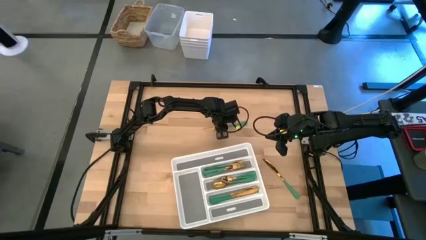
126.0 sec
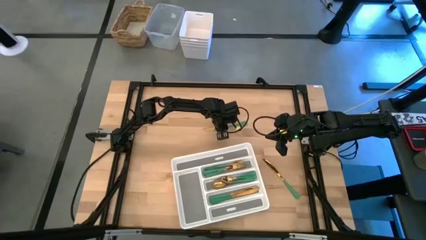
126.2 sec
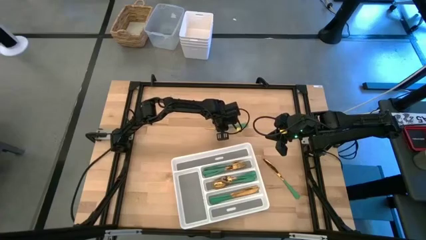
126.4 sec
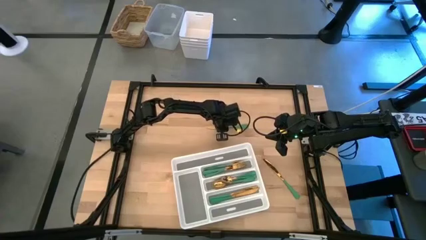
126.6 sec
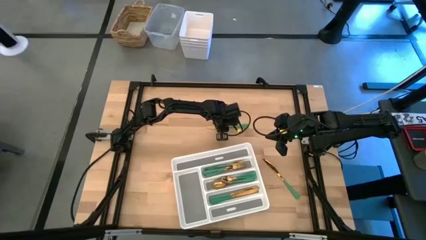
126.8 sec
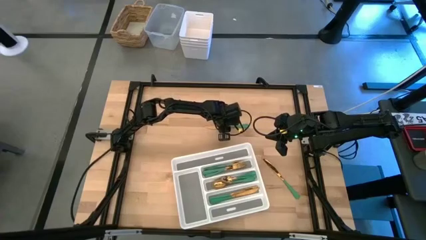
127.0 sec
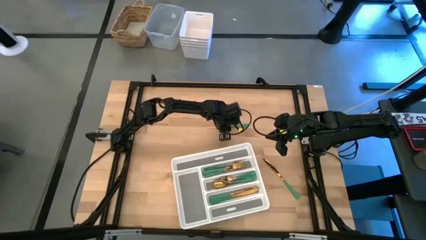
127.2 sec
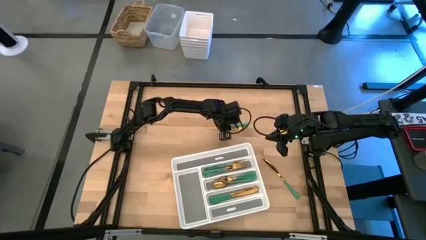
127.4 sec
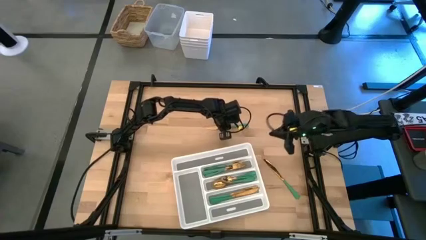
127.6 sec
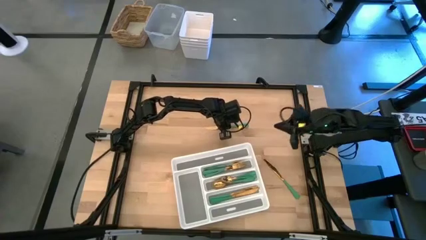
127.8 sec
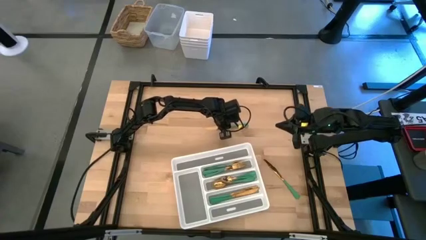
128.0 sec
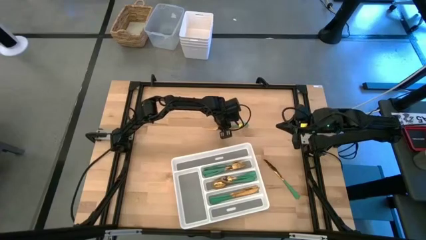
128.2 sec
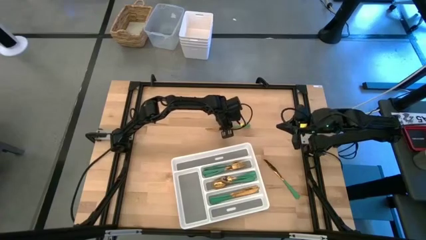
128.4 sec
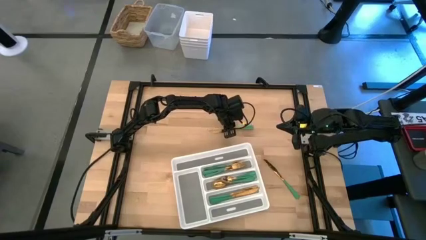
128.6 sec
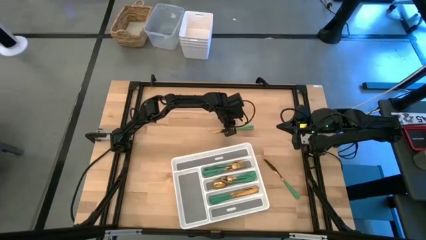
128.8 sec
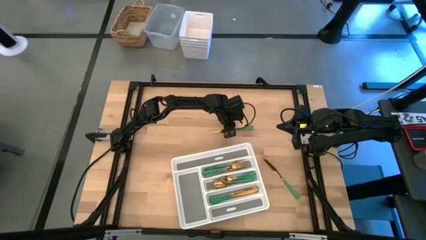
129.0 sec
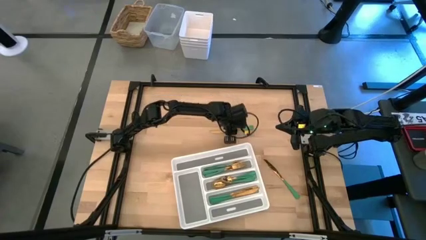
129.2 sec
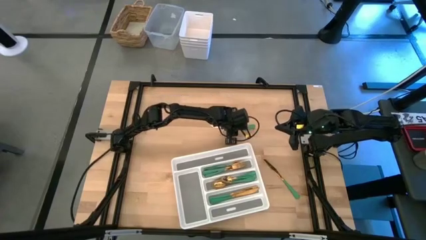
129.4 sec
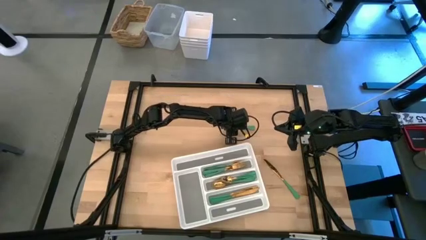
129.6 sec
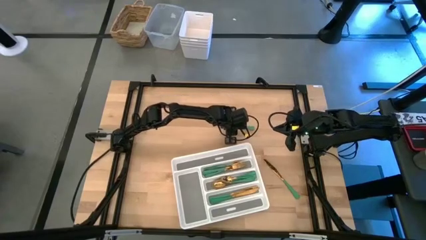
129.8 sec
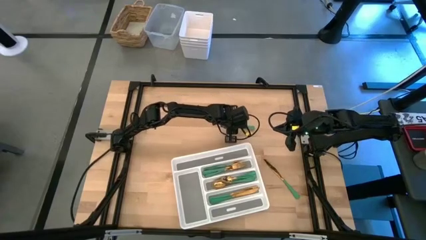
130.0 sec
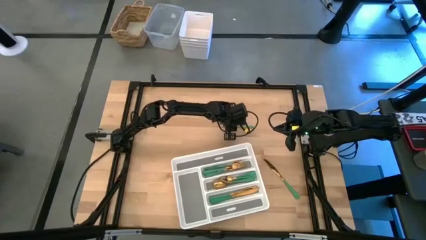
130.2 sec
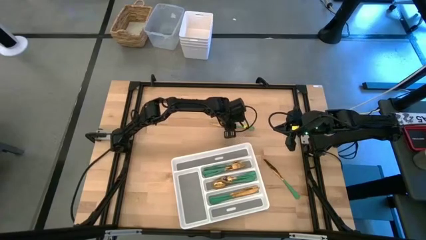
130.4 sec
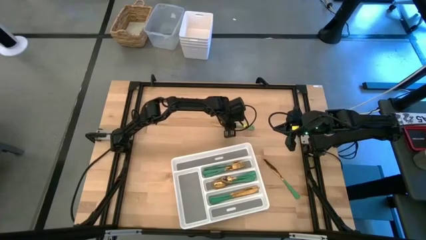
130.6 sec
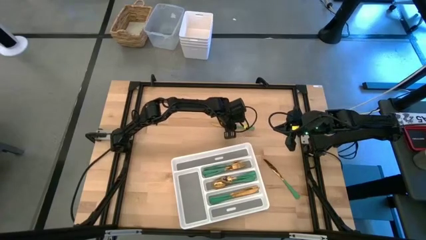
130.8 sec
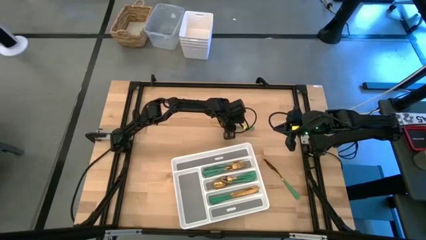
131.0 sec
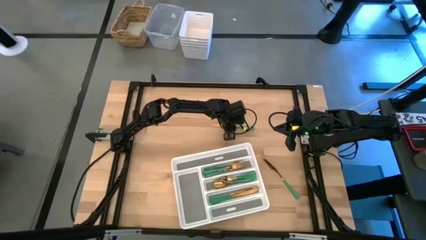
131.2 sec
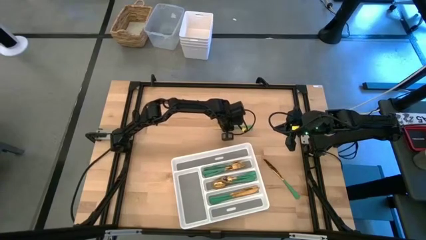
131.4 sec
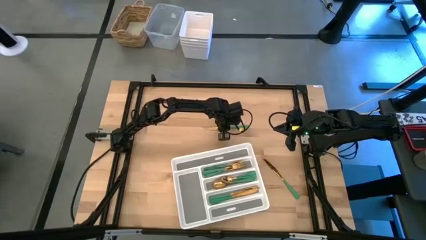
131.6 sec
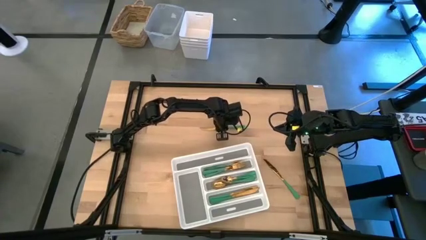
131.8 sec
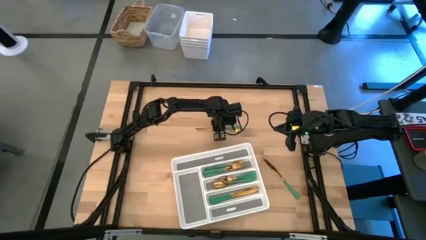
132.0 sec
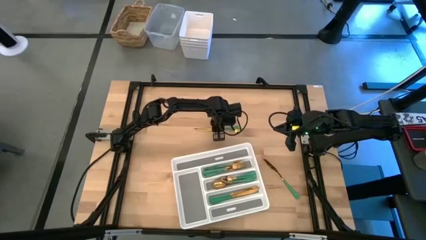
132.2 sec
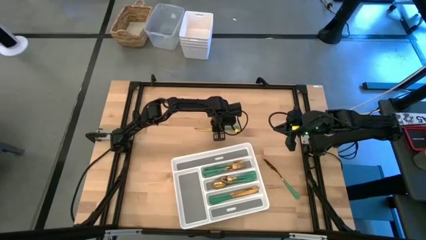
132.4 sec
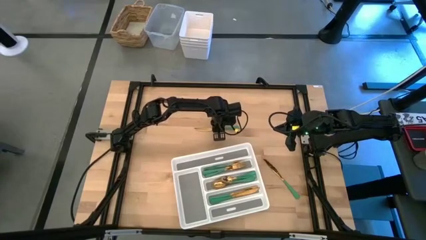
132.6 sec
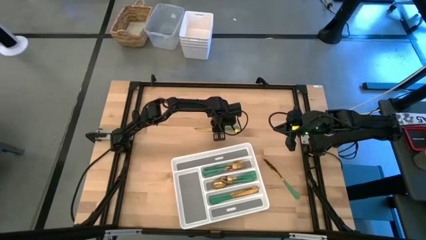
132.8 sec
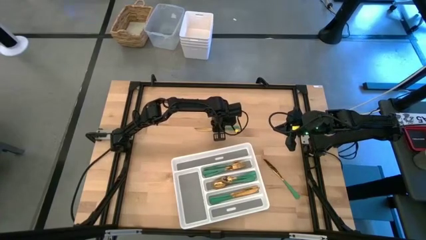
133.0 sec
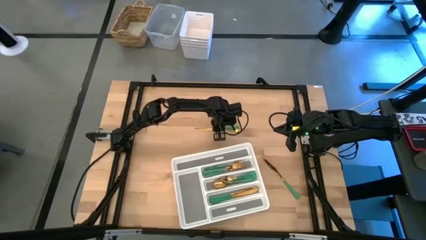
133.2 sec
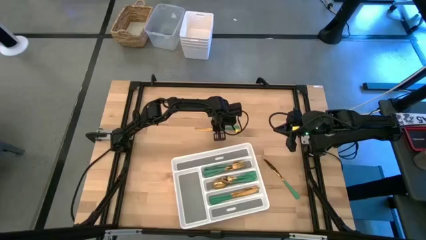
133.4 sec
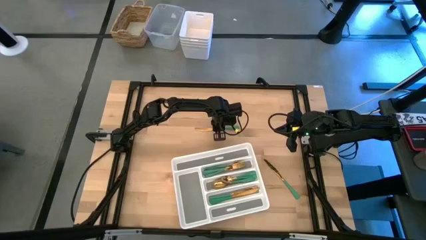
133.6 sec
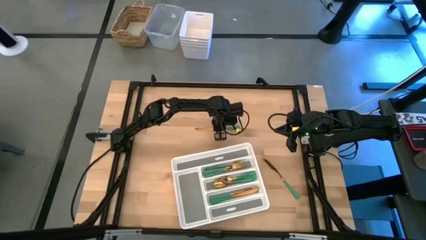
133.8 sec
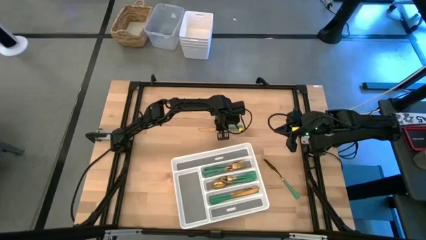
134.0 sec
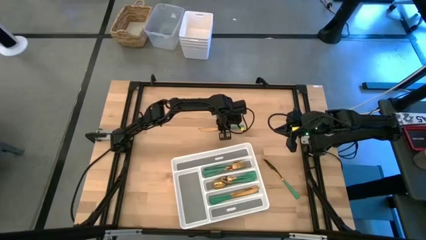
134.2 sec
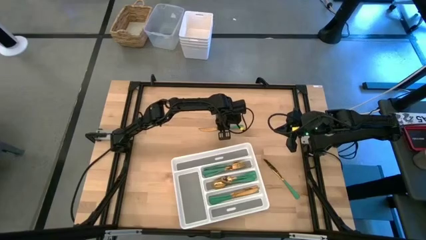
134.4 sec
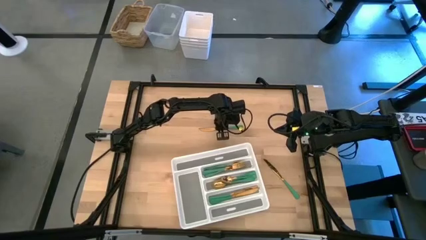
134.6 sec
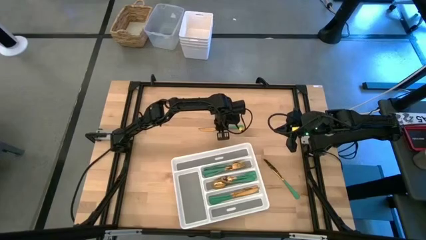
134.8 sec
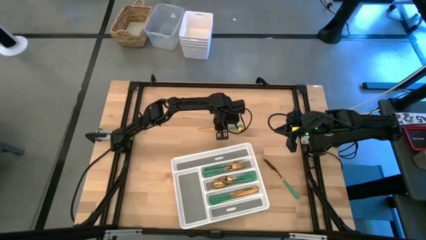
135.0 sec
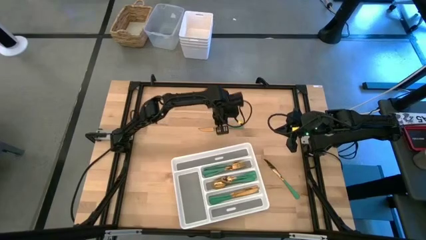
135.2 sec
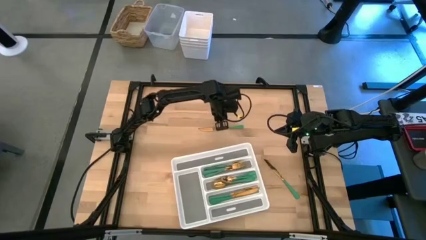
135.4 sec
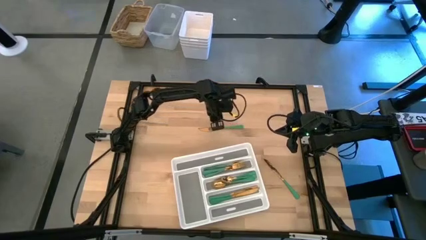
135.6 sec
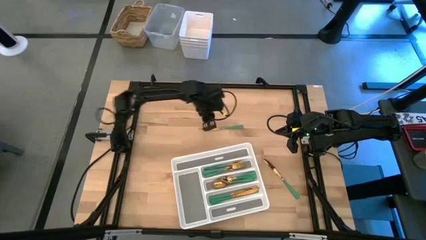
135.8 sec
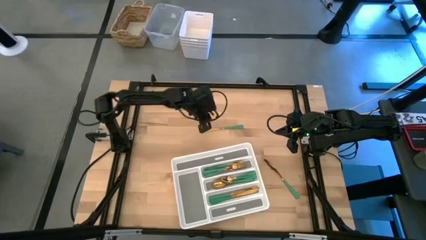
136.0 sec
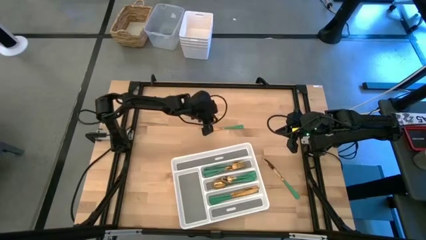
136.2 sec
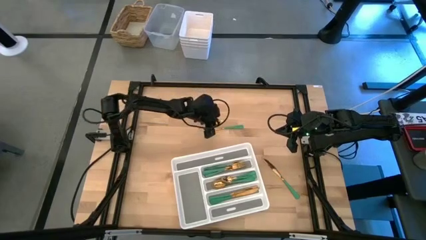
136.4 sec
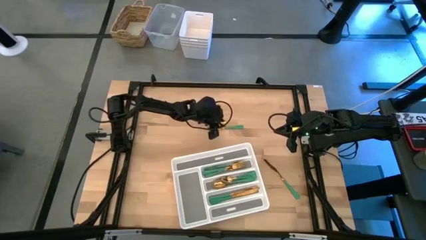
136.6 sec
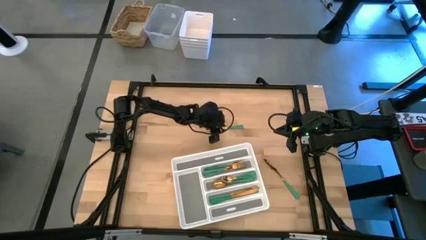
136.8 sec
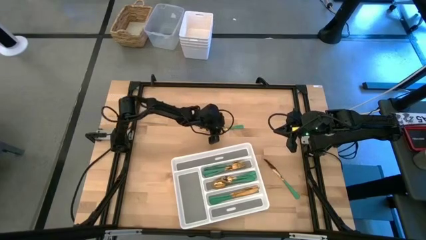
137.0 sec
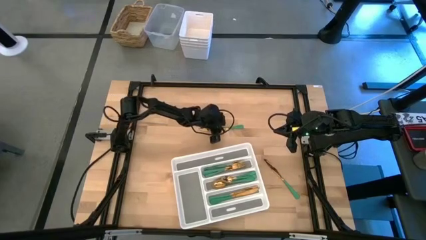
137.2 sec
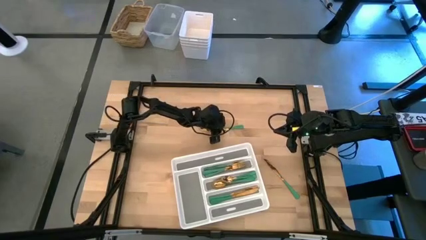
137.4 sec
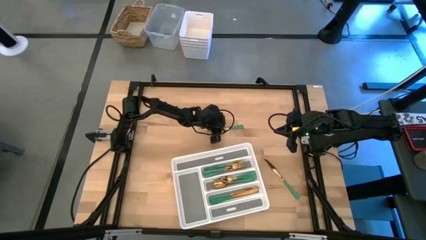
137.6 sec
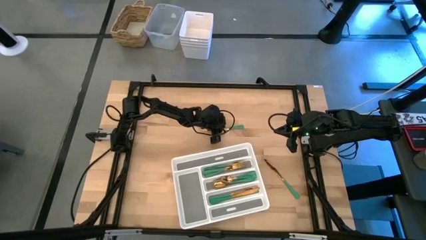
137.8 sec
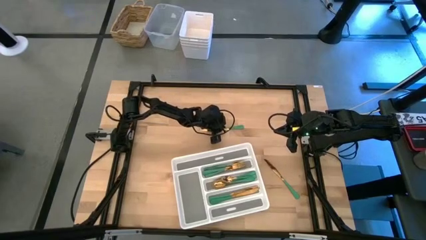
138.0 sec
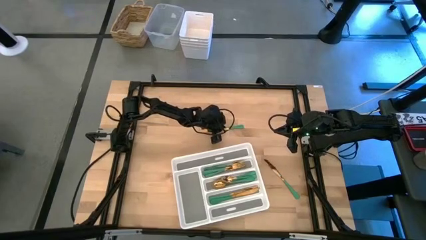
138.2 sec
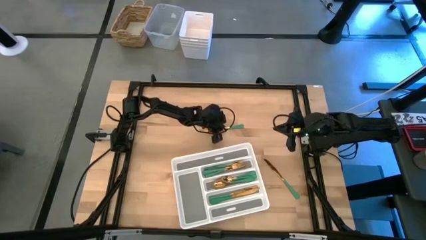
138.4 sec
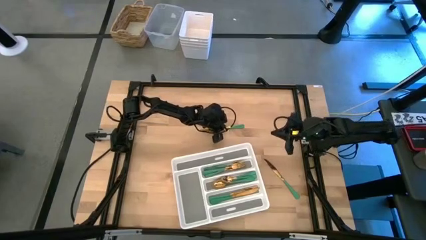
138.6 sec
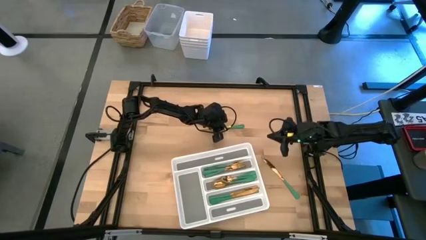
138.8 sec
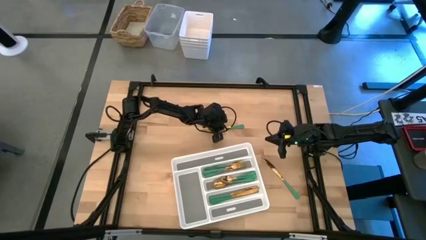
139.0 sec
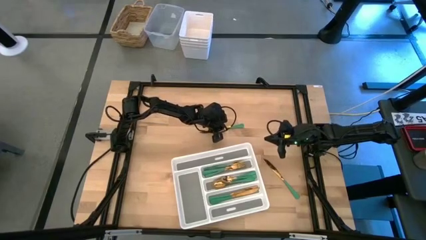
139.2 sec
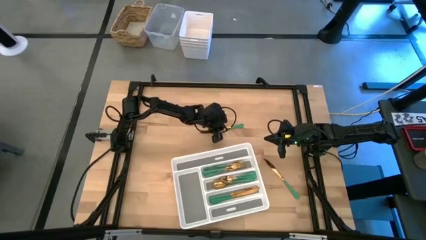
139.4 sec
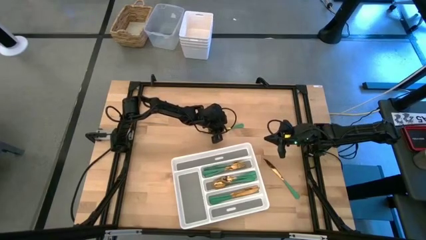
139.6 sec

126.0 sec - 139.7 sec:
Task: Sort silverware
Put the green knife into the white silverware tray

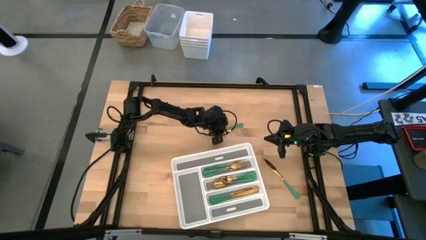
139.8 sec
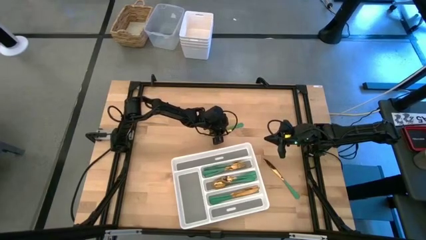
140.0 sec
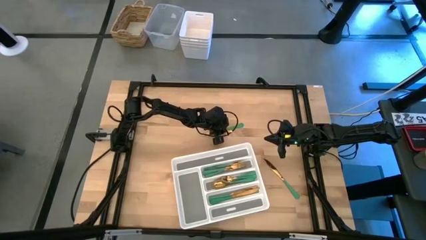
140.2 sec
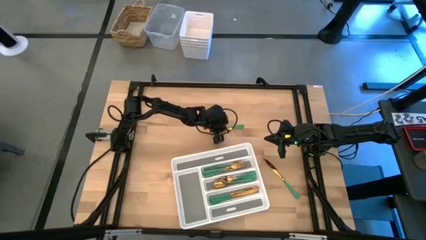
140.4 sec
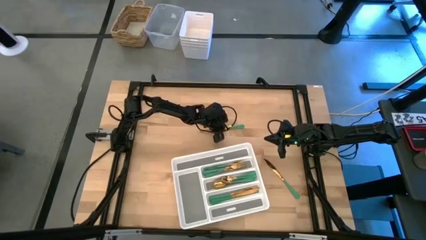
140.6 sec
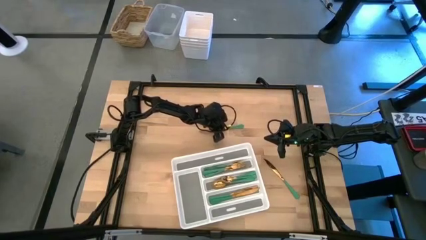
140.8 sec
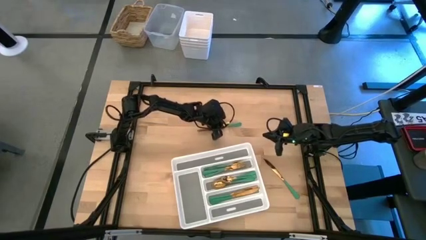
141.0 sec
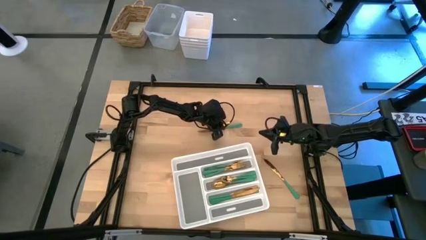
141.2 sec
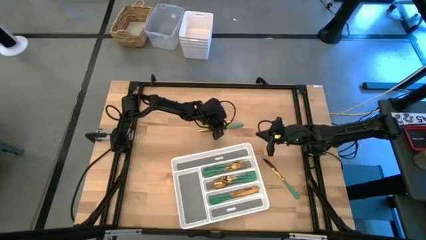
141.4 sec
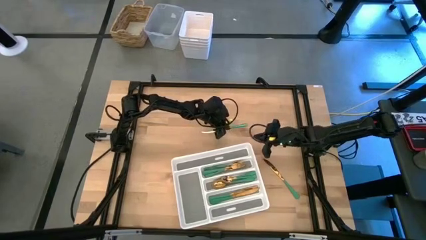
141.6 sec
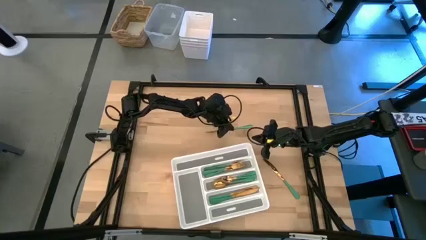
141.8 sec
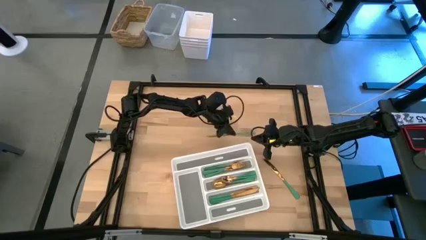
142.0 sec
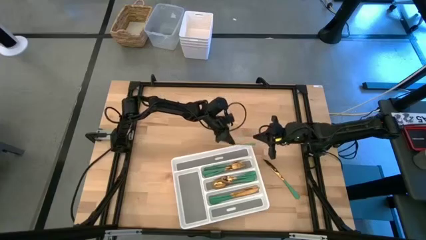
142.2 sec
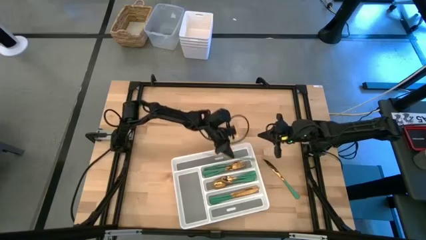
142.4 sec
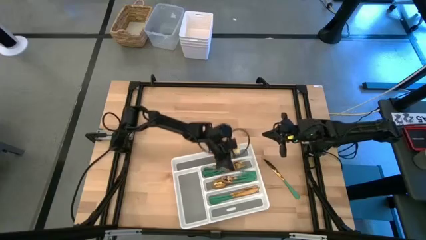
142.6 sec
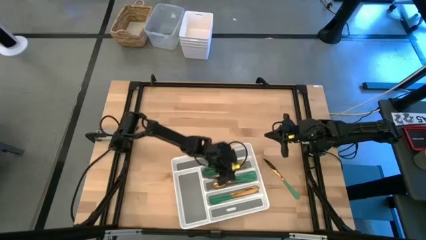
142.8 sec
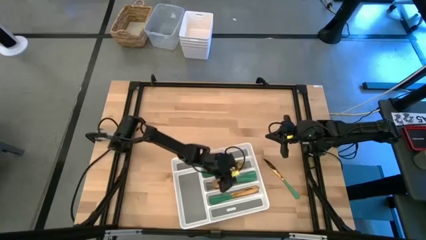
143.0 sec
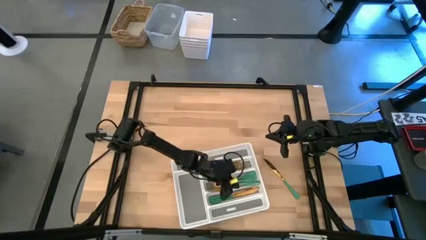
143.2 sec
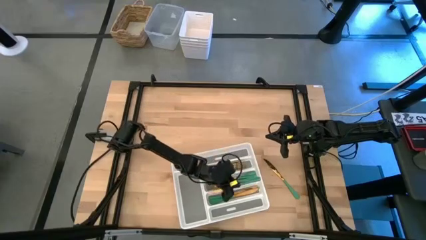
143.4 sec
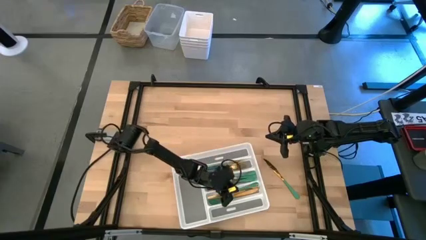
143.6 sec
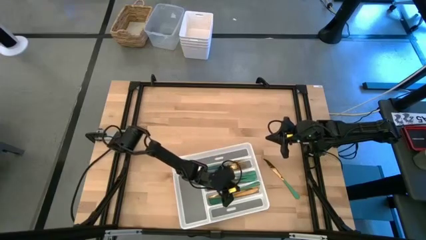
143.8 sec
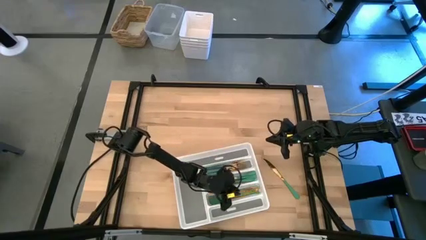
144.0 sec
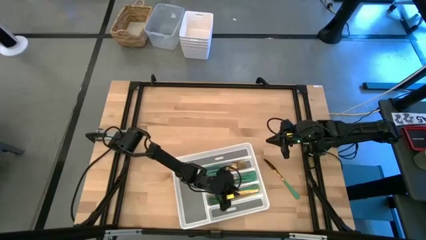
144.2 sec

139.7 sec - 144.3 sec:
Put the green knife into the white silverware tray
